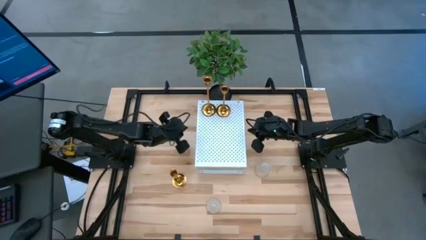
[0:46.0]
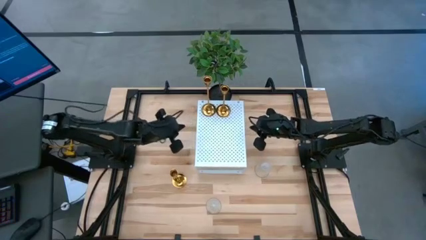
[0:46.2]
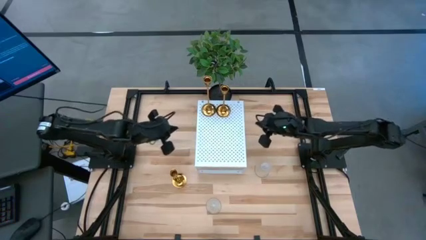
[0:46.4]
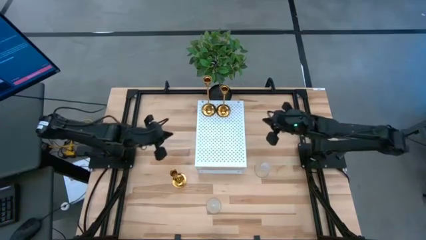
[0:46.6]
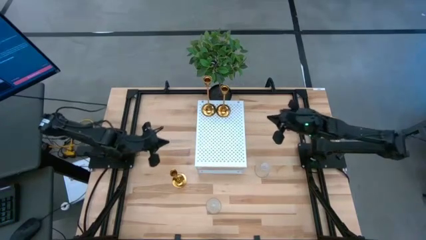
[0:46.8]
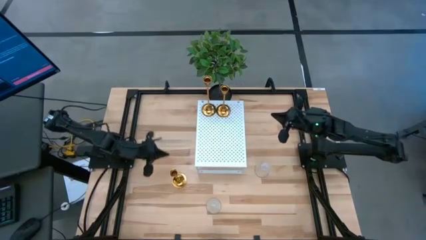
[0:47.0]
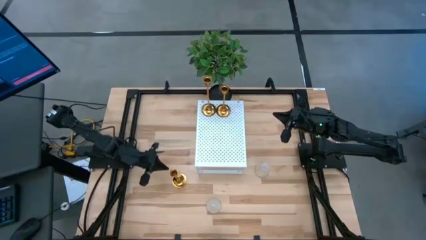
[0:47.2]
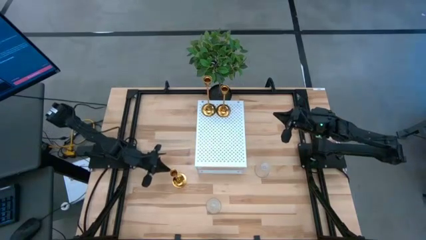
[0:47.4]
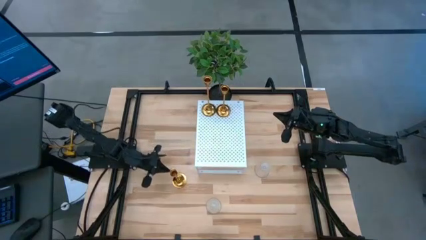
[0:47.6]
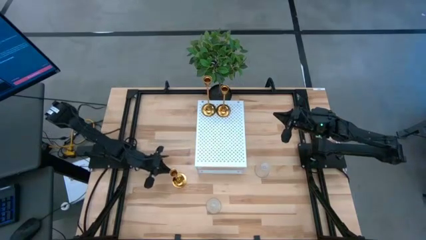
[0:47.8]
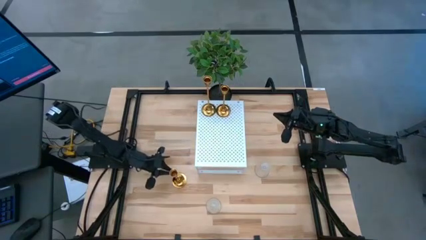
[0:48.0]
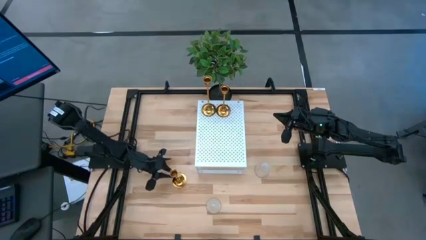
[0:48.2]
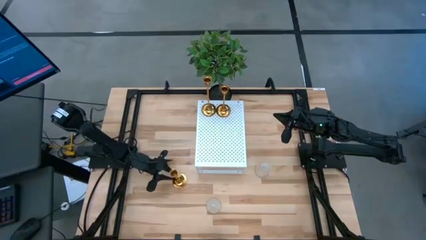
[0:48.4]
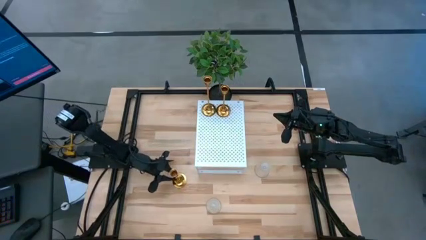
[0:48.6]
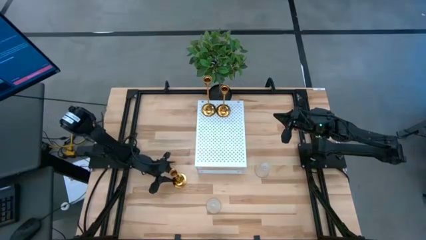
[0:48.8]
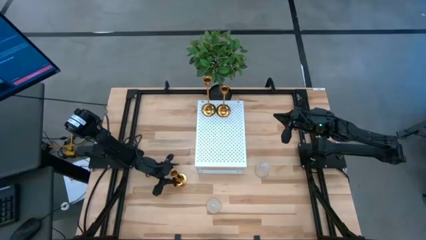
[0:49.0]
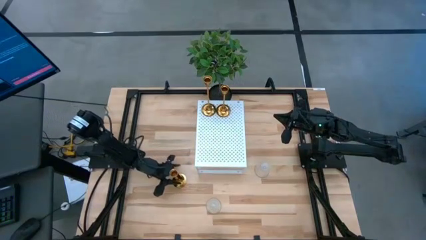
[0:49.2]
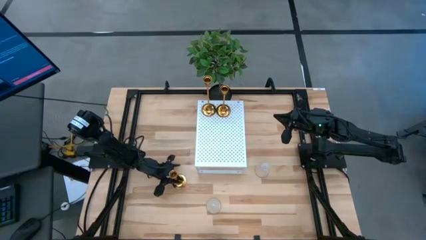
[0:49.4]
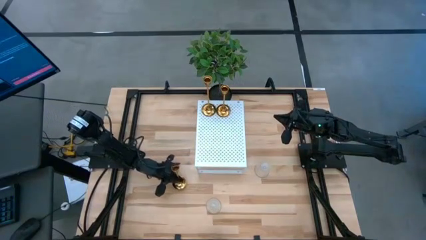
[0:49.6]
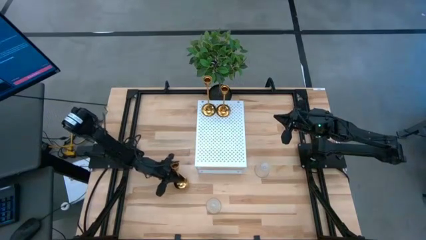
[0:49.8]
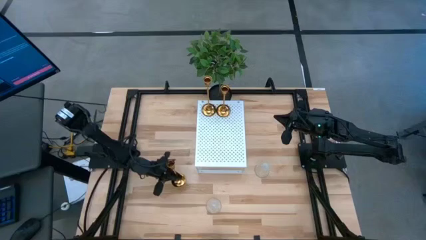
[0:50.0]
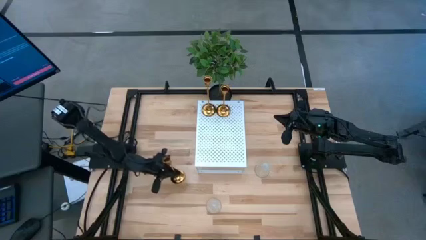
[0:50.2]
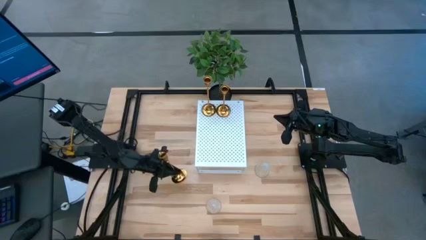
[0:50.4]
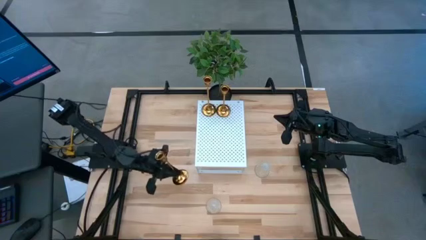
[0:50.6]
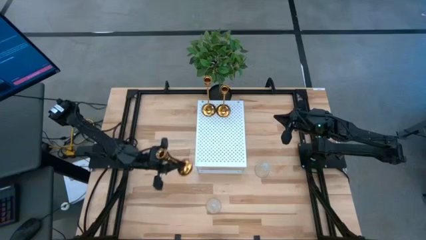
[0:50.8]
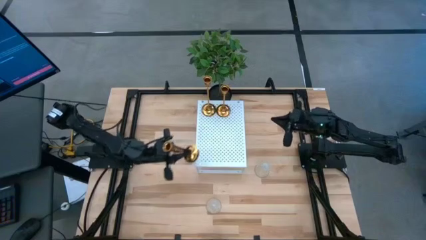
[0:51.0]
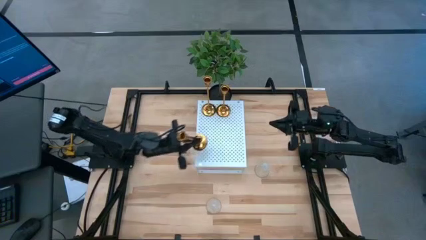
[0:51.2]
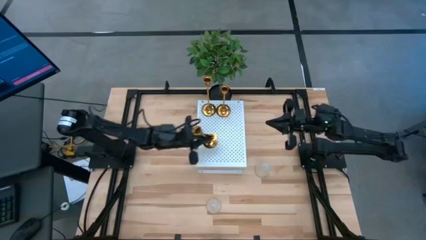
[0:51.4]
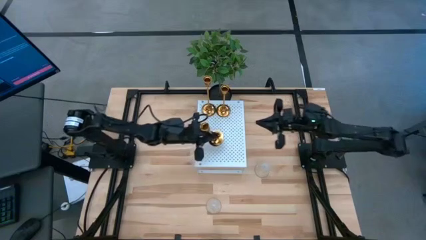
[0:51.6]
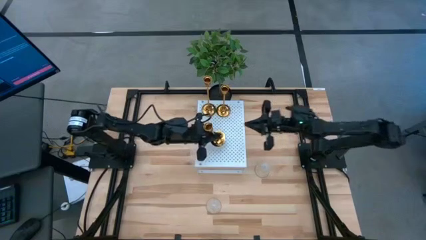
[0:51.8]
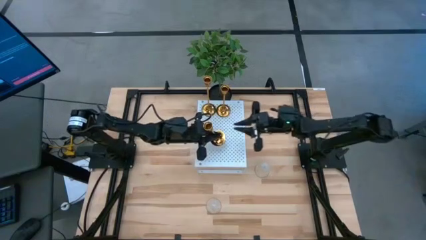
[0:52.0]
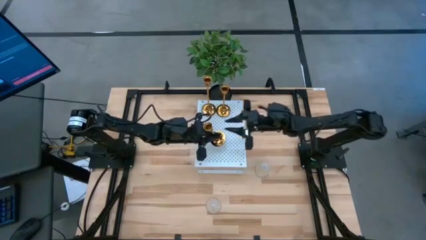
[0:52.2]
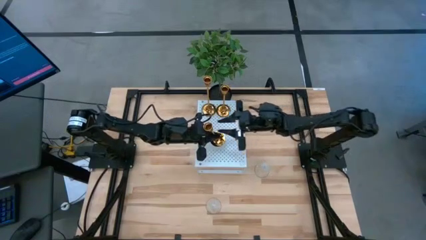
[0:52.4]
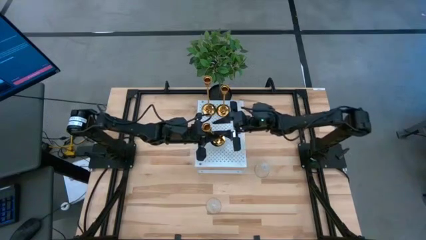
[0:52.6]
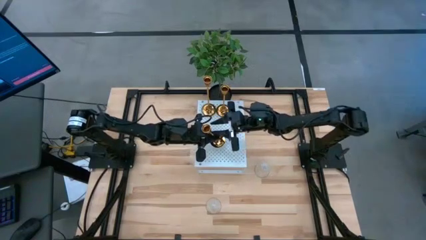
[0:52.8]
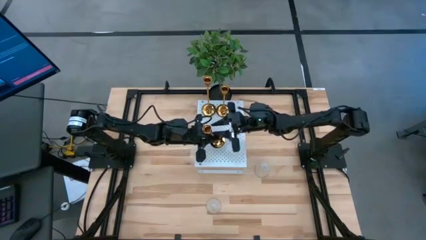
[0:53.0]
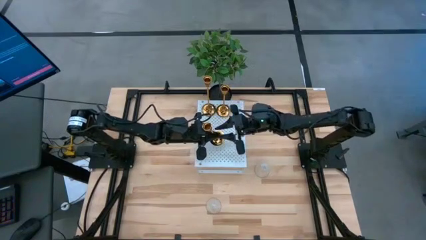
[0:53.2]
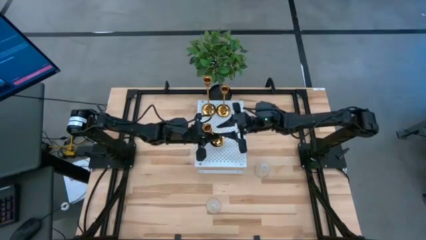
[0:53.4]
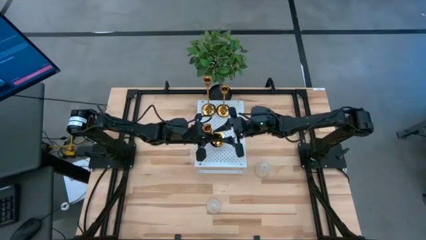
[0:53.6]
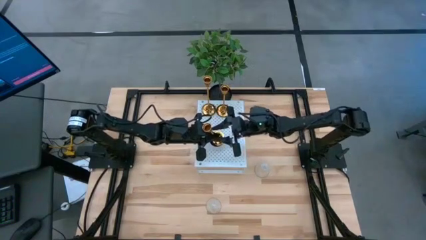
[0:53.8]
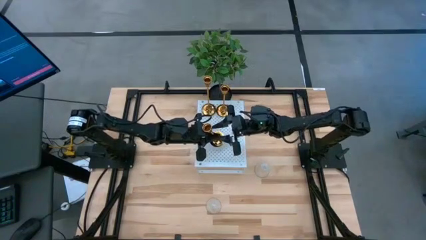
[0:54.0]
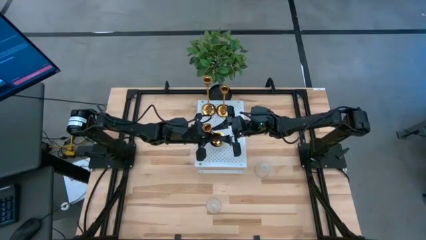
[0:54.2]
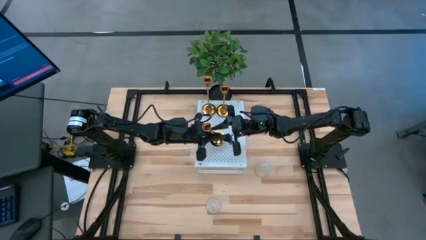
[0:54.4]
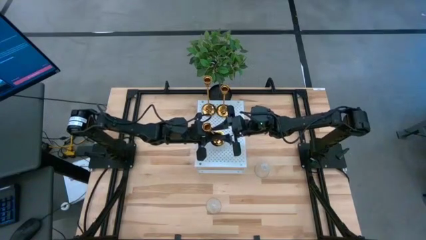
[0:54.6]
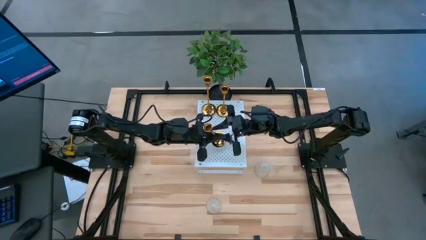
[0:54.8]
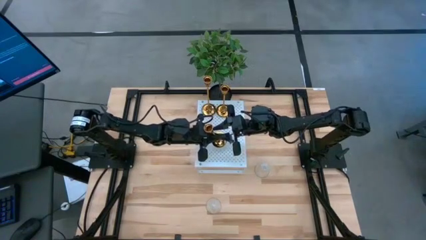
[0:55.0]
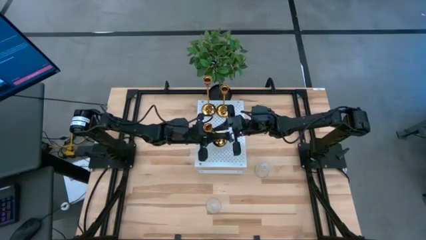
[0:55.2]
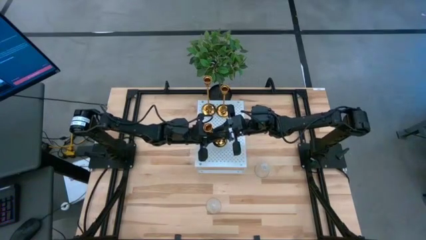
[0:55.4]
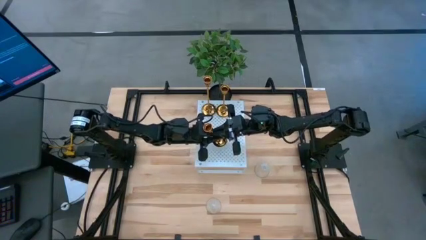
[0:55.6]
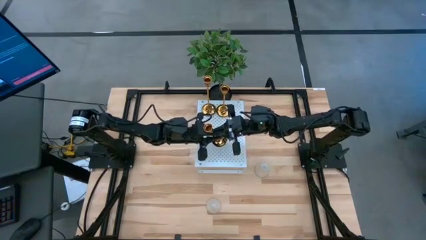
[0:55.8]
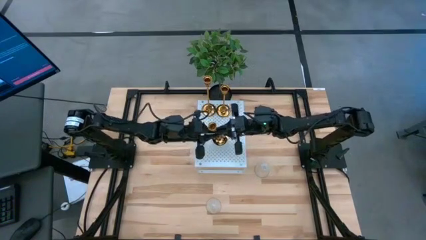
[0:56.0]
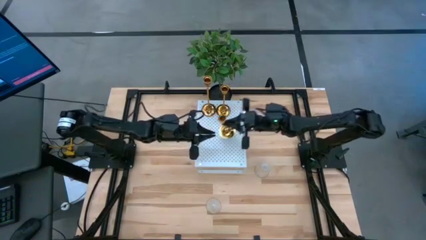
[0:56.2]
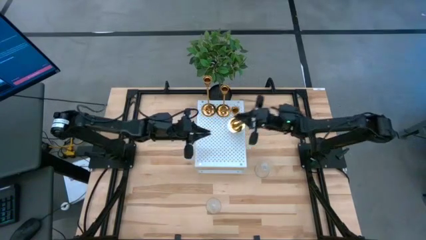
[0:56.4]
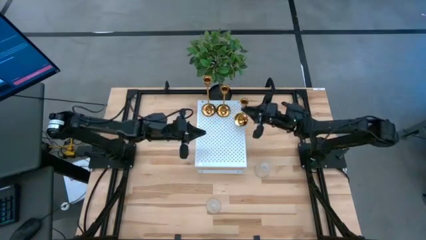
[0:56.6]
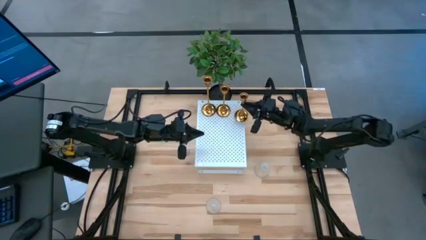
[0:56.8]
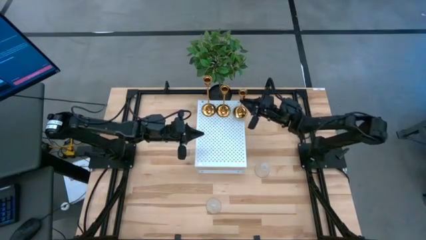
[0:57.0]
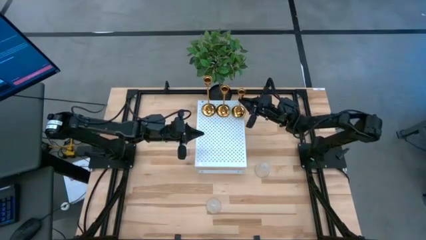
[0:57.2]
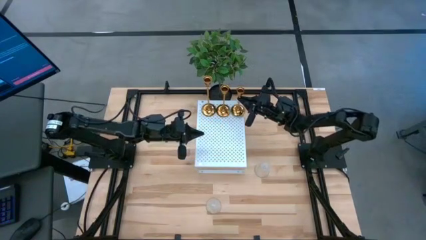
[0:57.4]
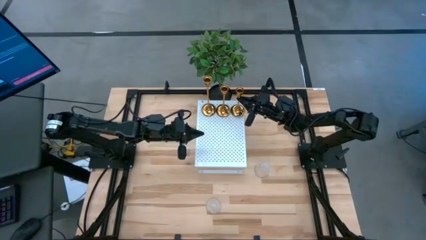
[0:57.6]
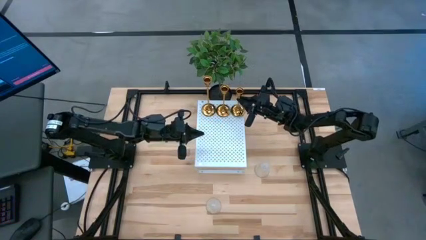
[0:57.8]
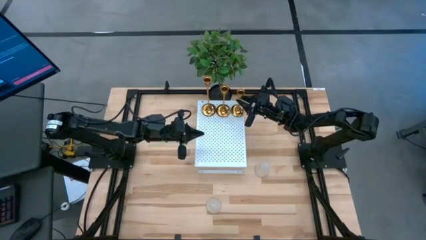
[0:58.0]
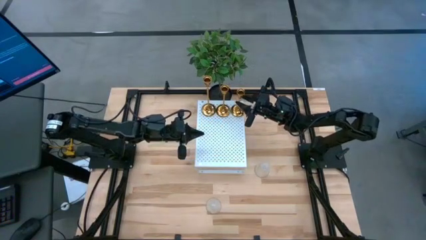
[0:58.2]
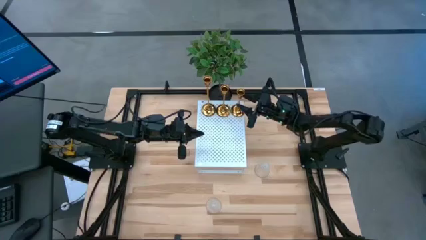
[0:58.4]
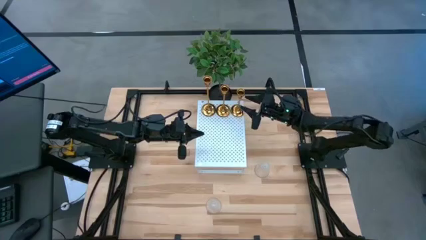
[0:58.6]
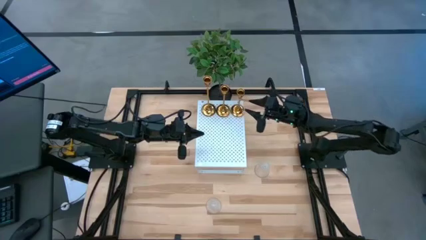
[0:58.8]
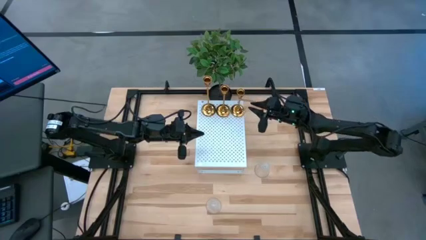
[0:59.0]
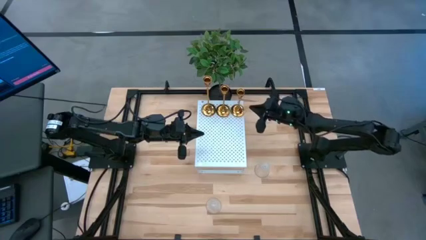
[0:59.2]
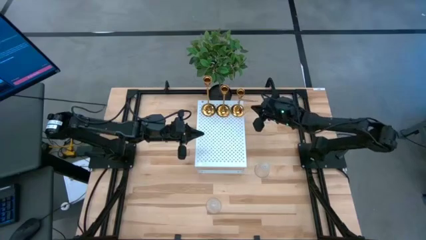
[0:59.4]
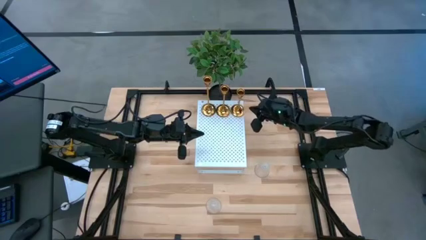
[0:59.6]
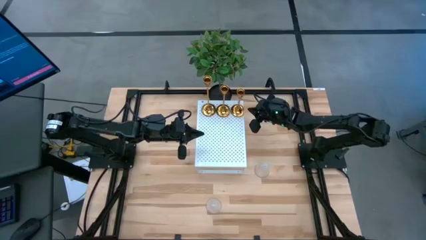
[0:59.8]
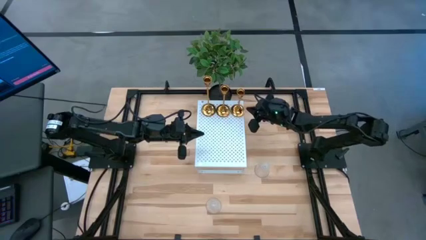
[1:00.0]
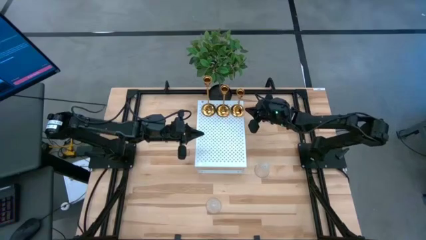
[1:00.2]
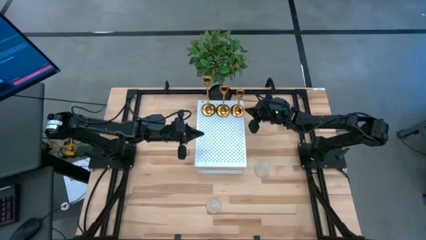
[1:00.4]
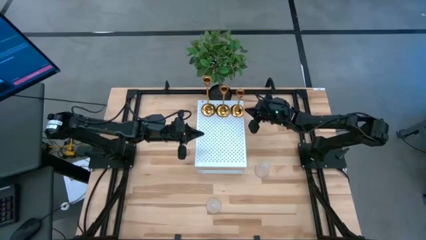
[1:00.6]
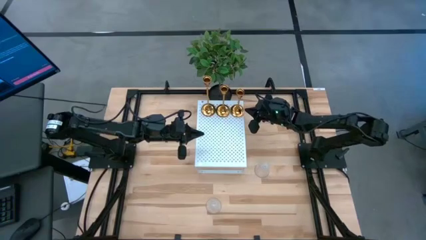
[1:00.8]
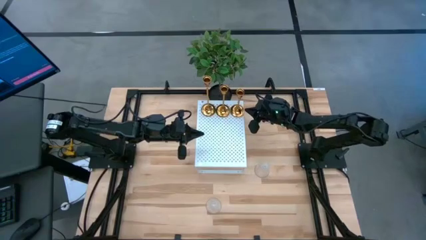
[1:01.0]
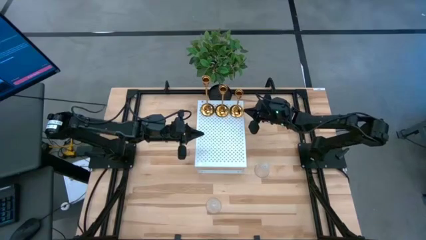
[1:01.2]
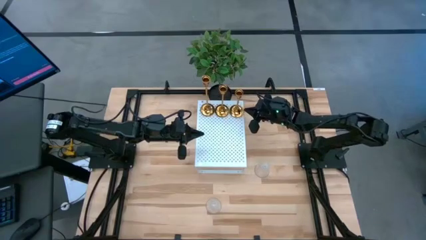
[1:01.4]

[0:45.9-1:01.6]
Task: Pick & Place candle stick holders
Align the gold candle holder with the other gold candle holders on the shelf
